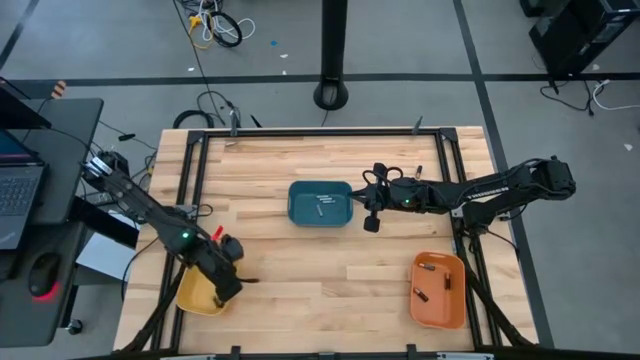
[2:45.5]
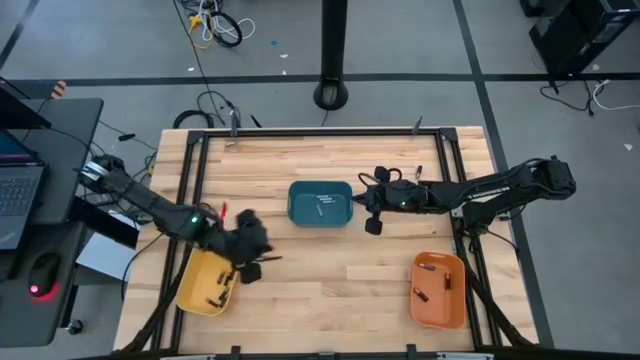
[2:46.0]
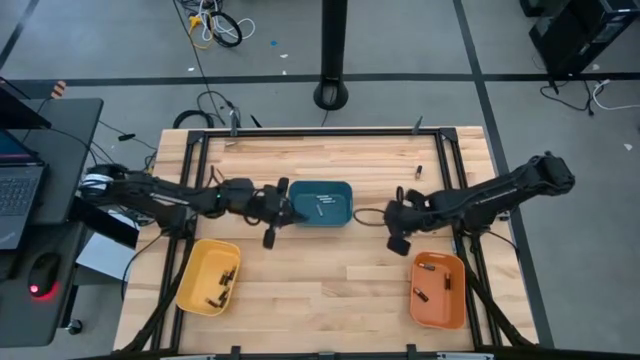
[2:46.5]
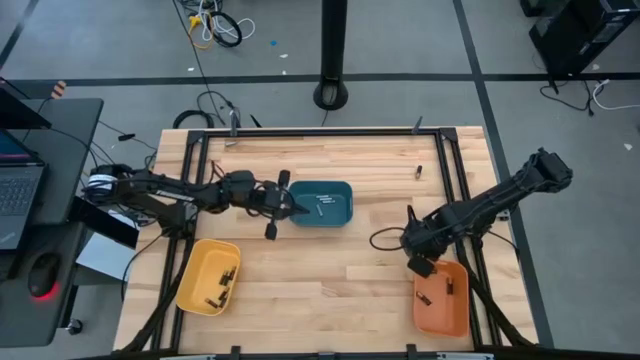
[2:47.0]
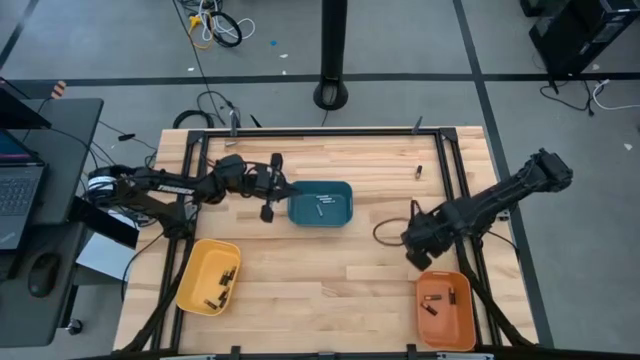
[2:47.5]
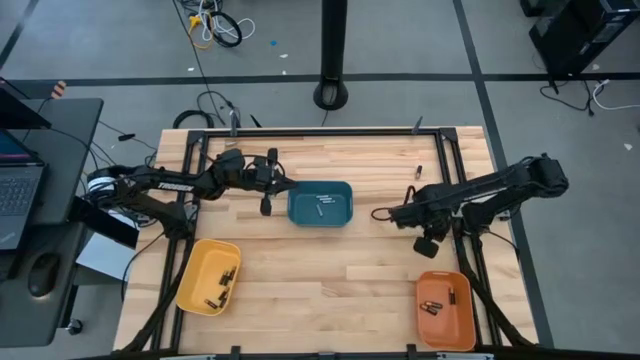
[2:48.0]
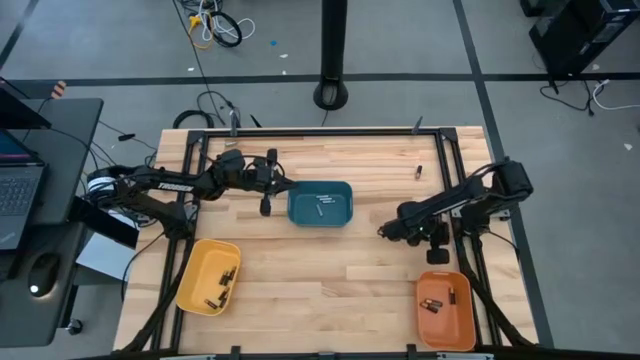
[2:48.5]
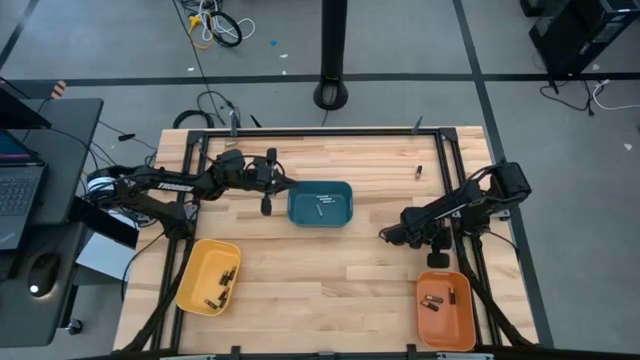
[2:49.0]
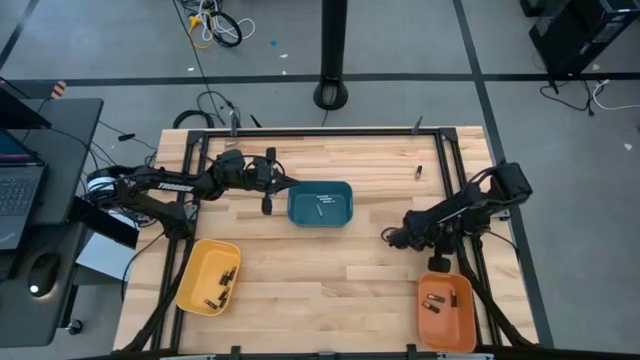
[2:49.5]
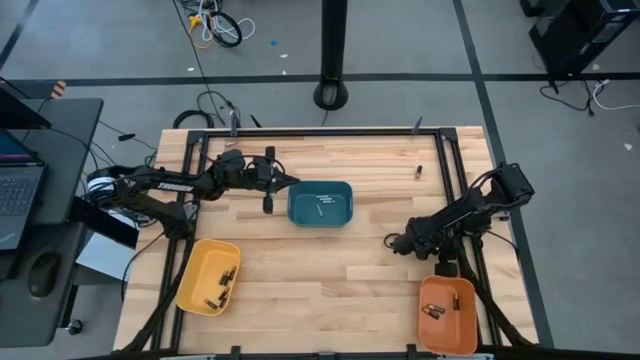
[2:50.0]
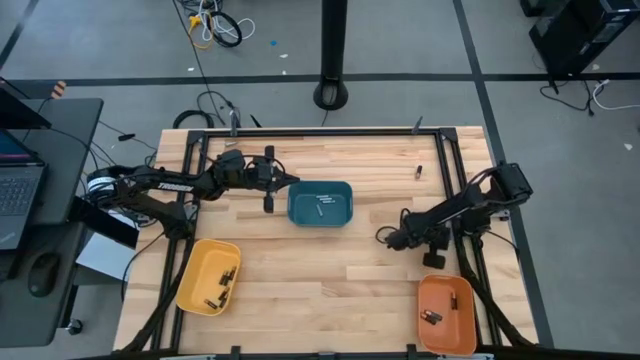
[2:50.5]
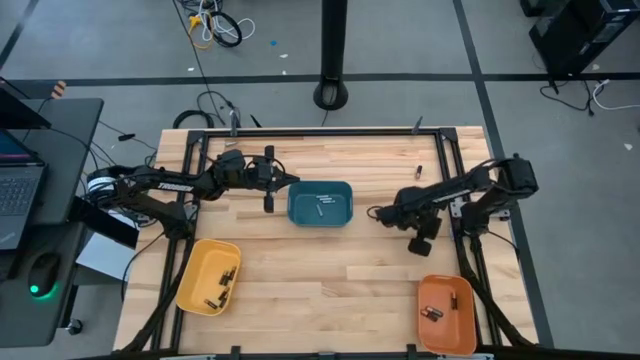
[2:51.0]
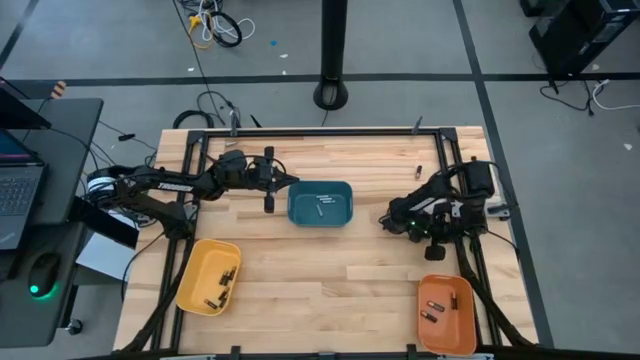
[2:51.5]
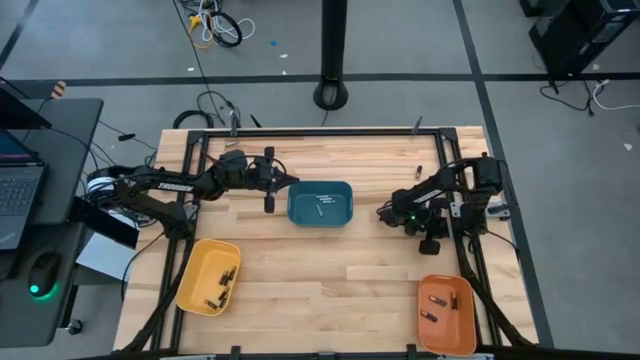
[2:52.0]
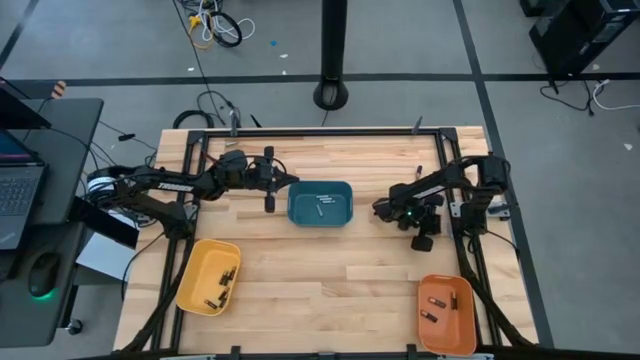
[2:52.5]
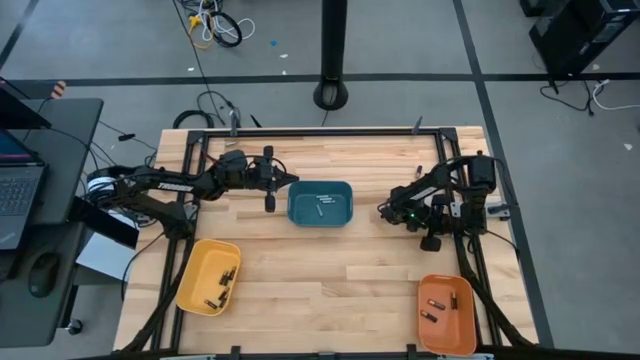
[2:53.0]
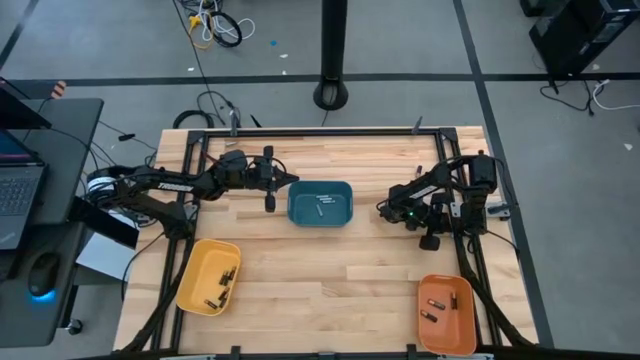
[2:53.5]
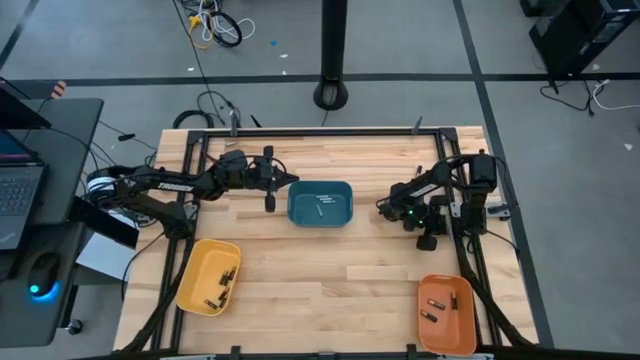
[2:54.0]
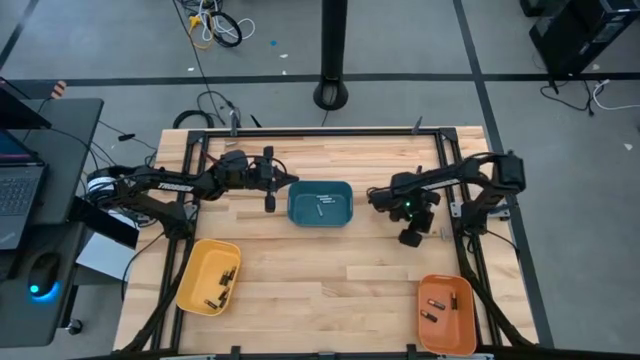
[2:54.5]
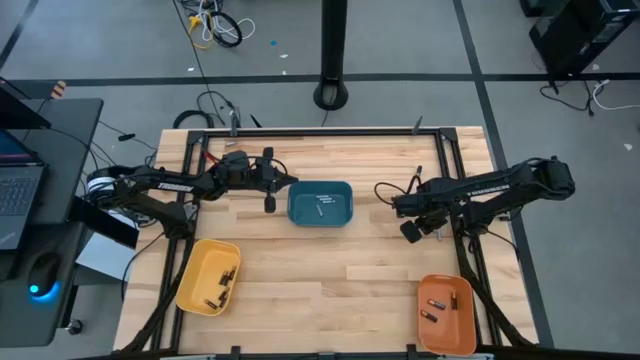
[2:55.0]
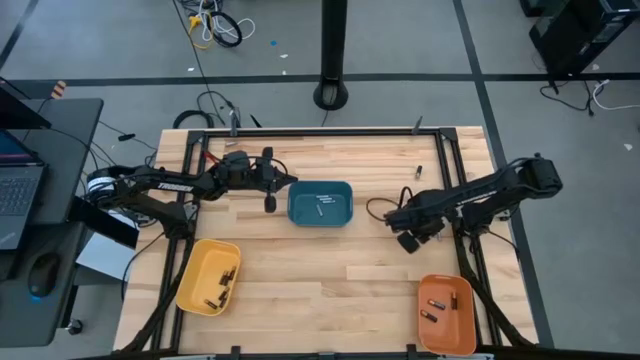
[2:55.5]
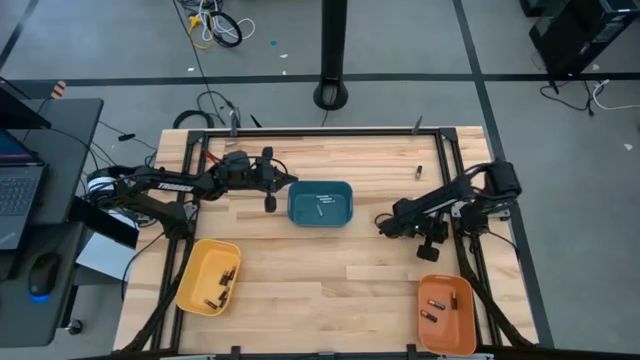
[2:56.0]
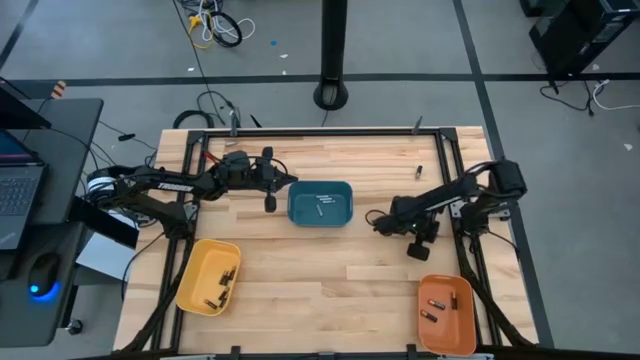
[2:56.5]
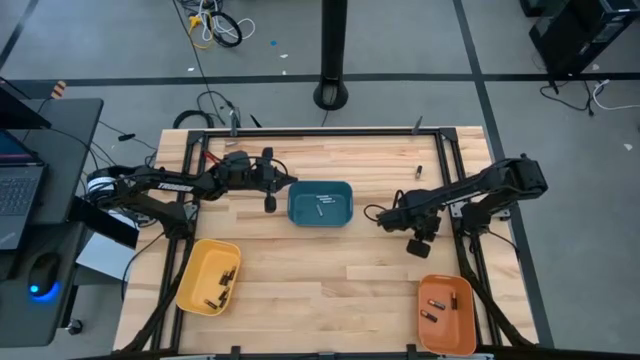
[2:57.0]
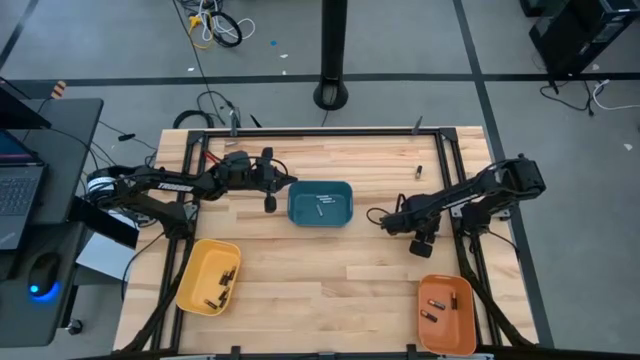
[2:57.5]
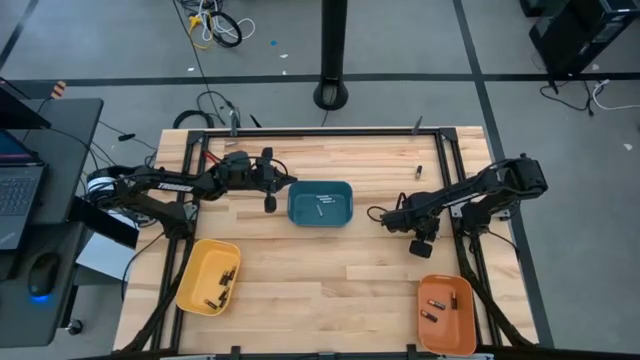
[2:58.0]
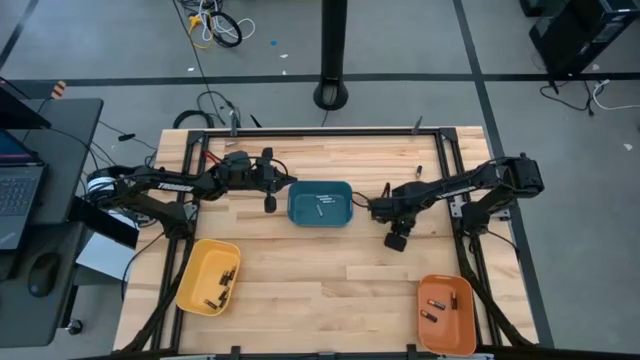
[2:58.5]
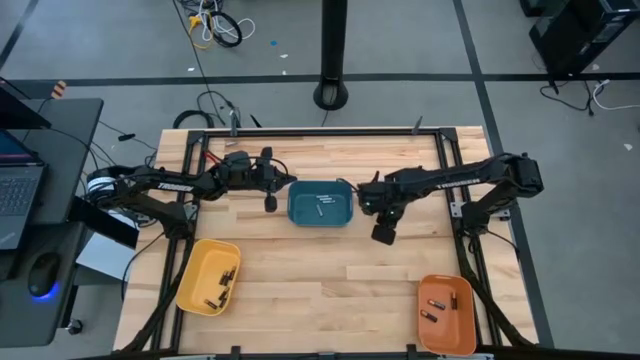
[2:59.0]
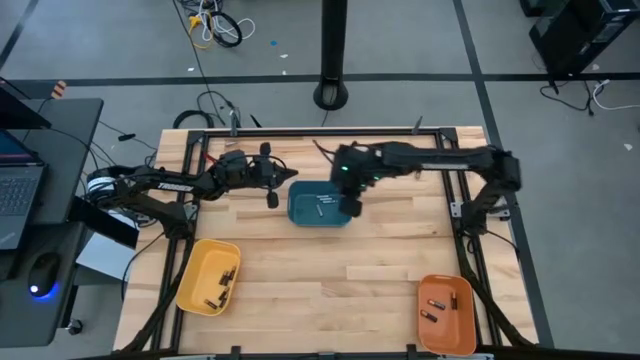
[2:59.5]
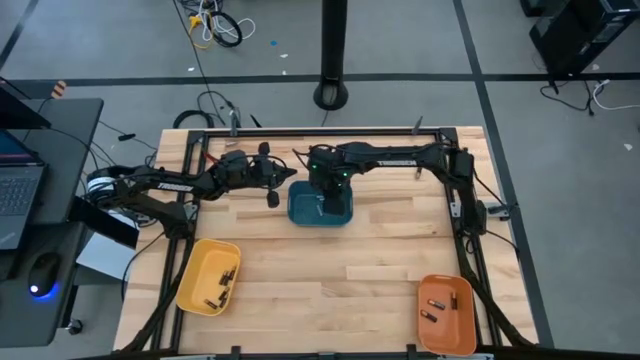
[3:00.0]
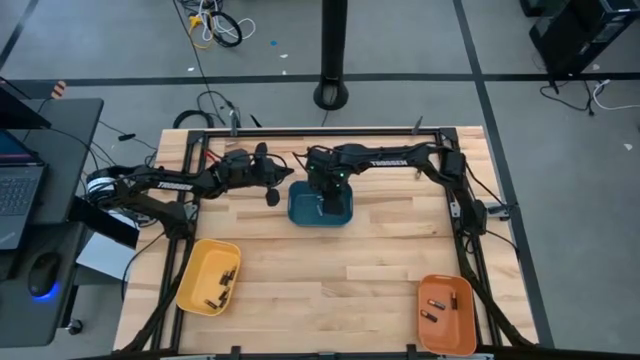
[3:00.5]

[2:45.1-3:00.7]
Task: Sort batteries
Put the silver battery into the blue bin

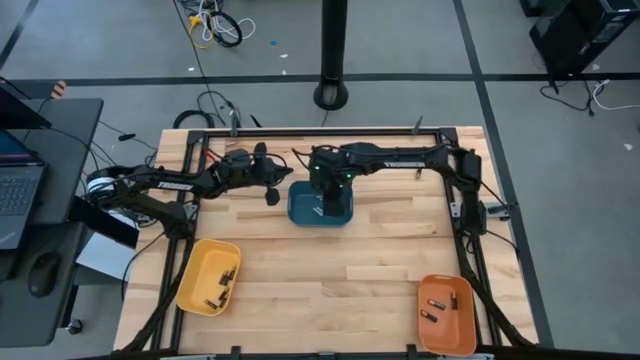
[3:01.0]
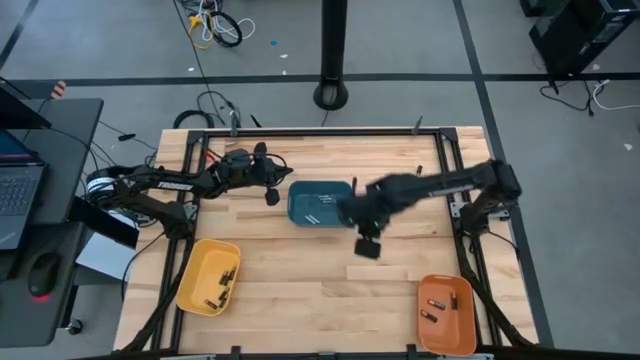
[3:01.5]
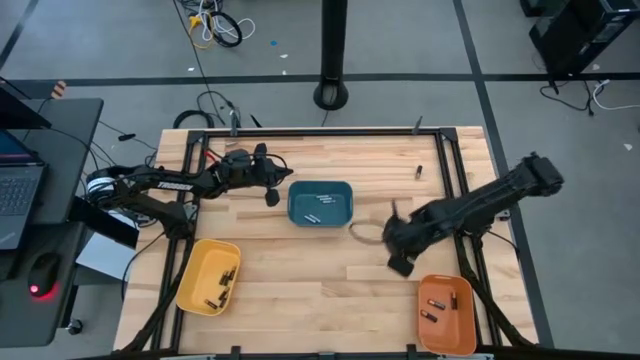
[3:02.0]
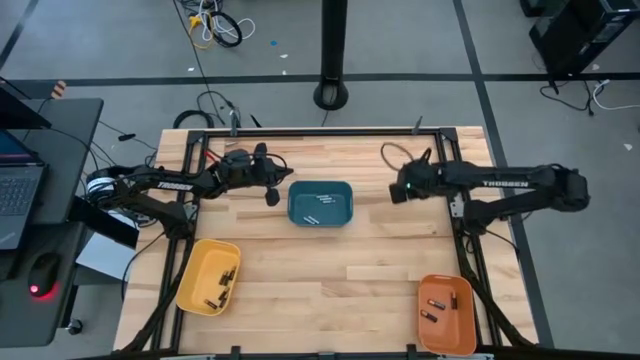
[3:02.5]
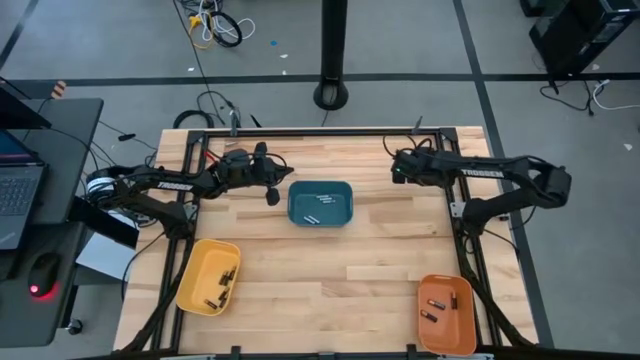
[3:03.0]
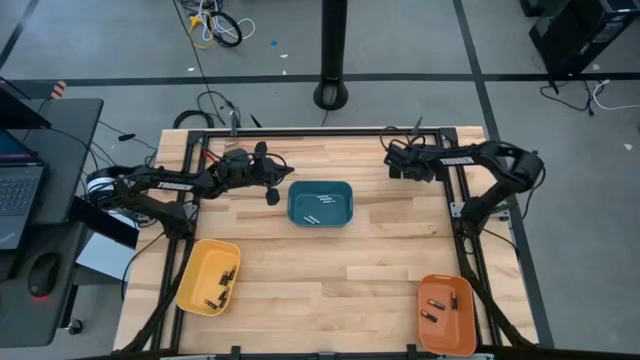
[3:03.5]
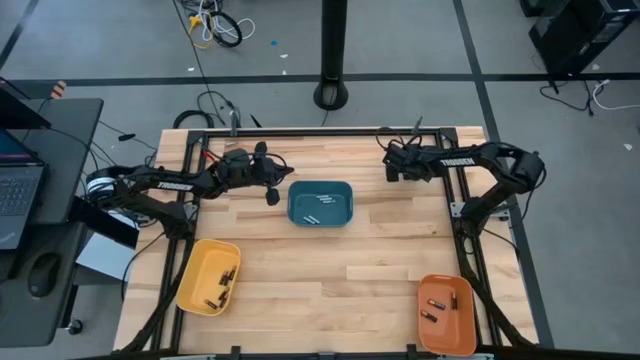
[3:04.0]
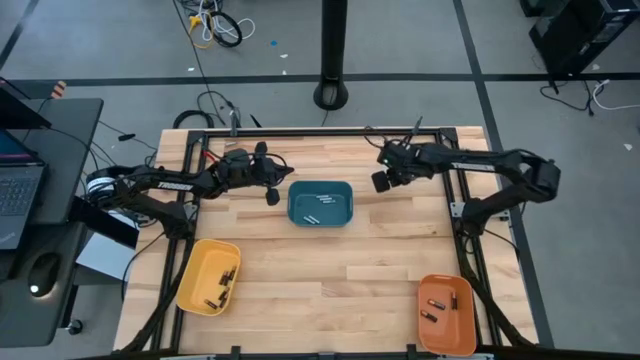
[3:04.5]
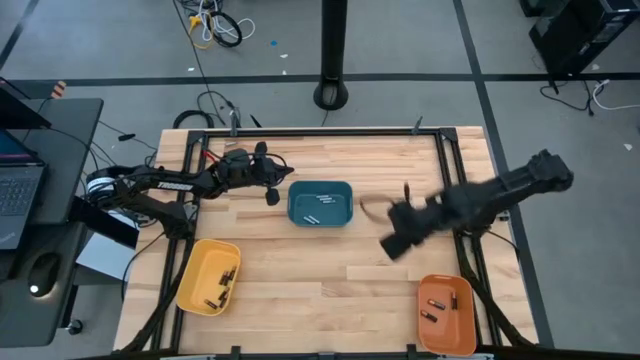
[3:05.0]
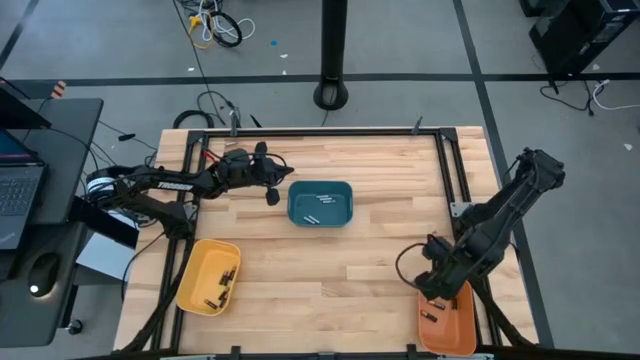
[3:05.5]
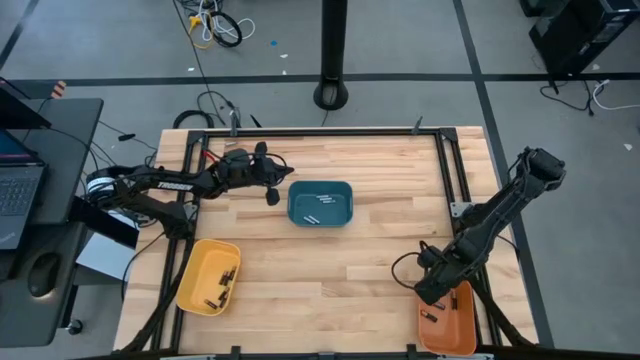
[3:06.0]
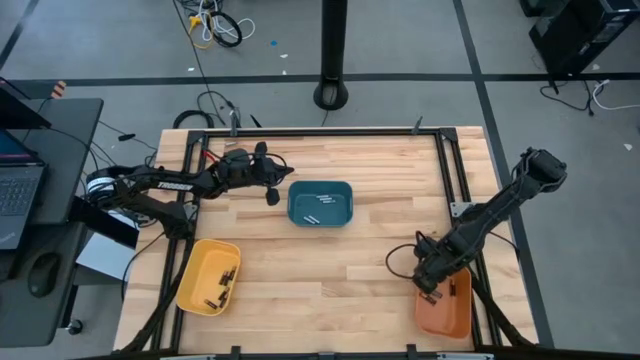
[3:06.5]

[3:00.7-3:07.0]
Put the large black battery into the orange bin

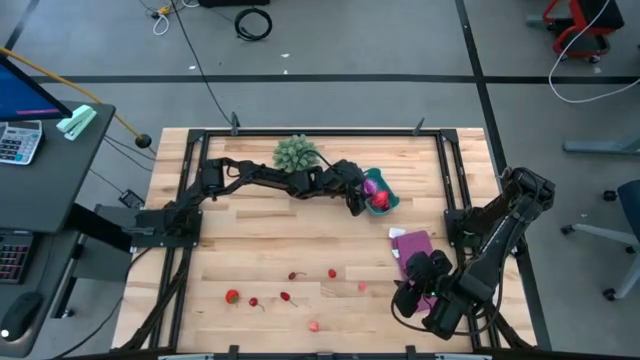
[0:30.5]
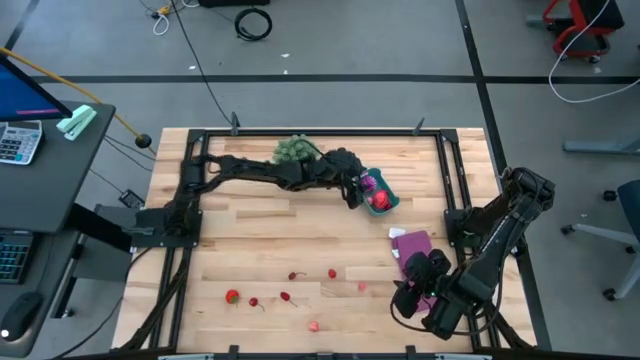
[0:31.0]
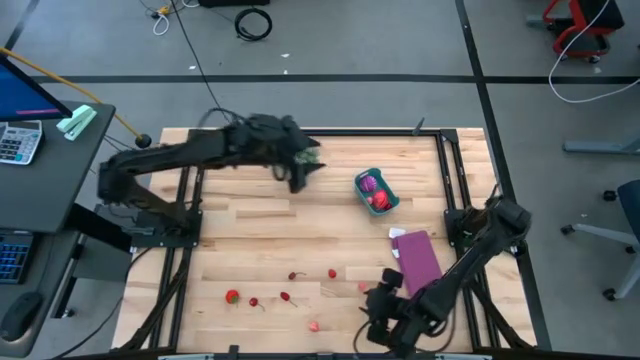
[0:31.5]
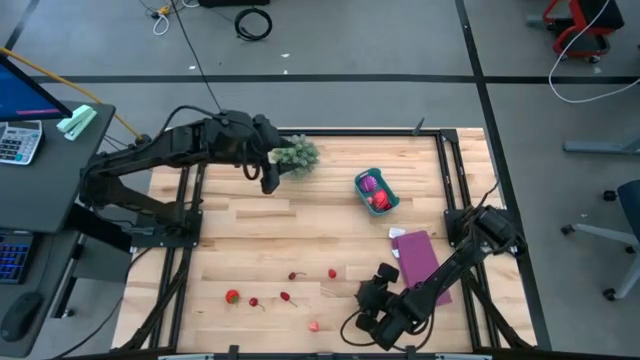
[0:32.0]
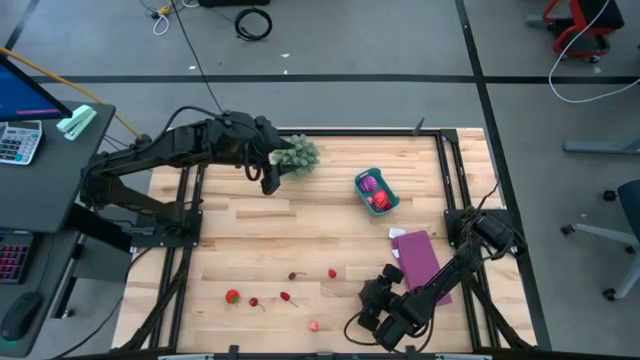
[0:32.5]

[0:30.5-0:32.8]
Task: Pick and placing Produce into tupperware
Put the pink peach into the blue bin
